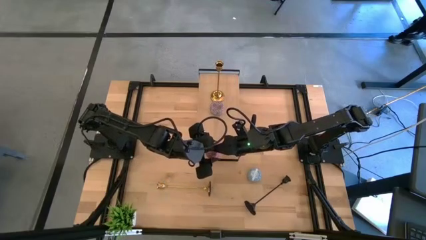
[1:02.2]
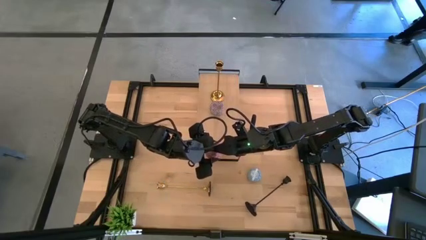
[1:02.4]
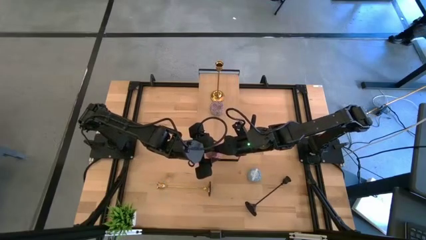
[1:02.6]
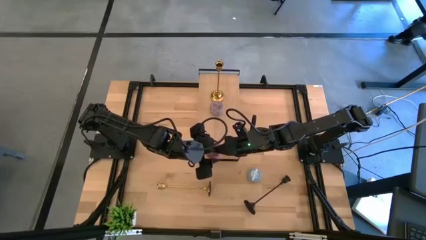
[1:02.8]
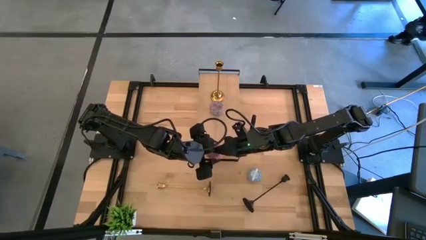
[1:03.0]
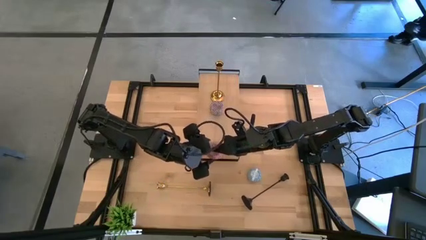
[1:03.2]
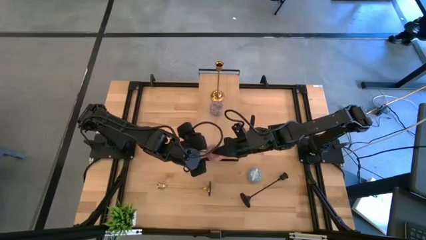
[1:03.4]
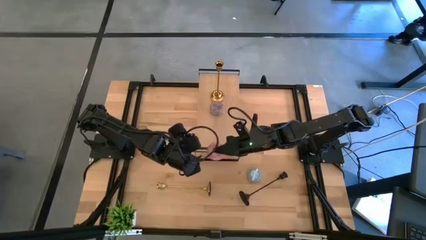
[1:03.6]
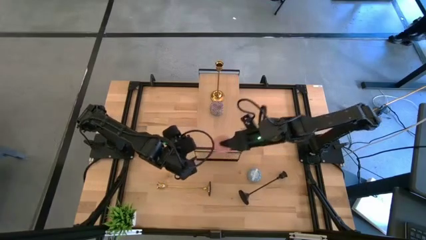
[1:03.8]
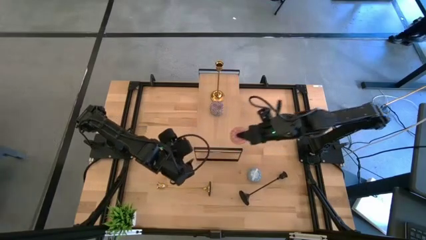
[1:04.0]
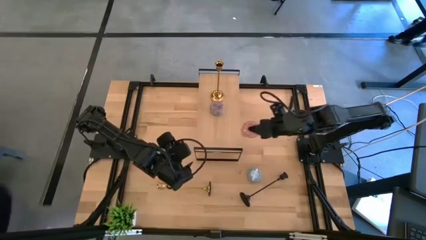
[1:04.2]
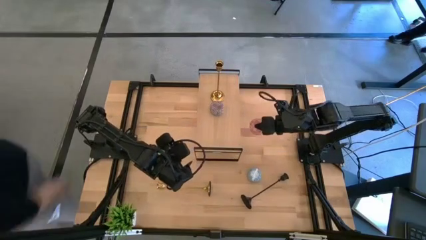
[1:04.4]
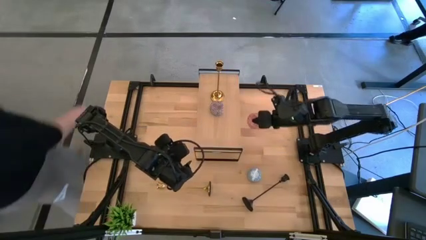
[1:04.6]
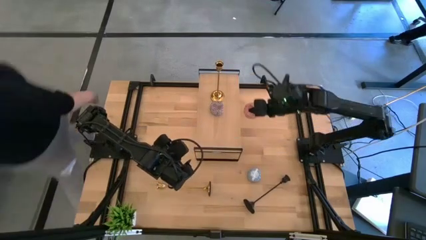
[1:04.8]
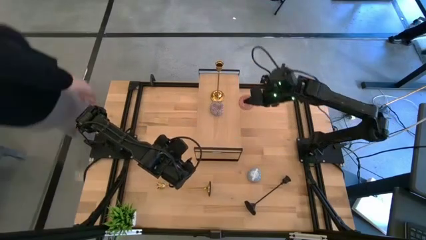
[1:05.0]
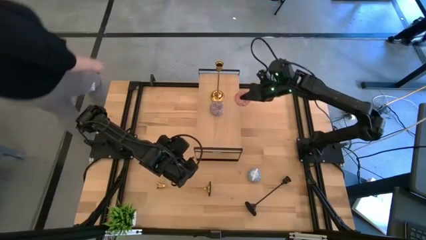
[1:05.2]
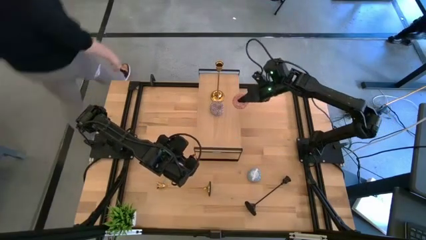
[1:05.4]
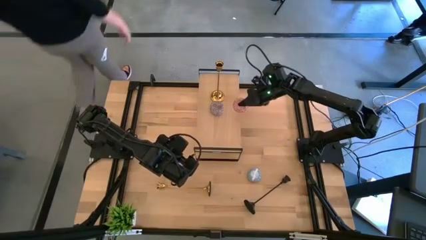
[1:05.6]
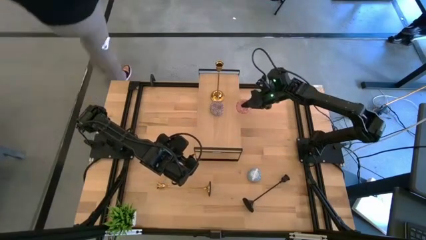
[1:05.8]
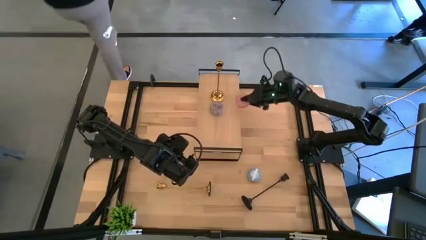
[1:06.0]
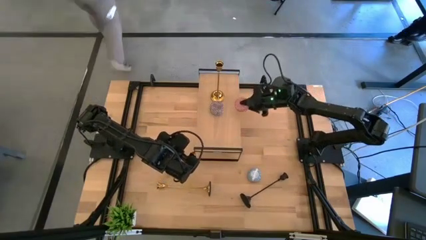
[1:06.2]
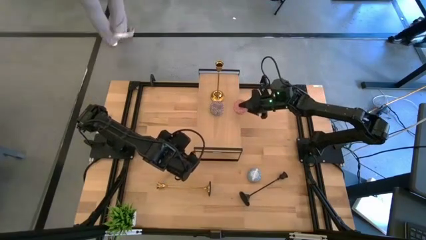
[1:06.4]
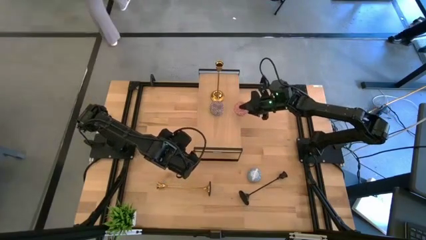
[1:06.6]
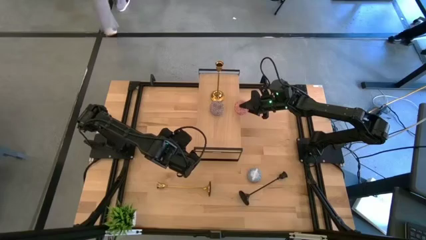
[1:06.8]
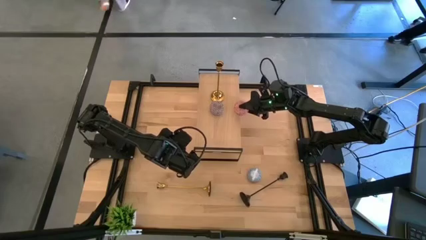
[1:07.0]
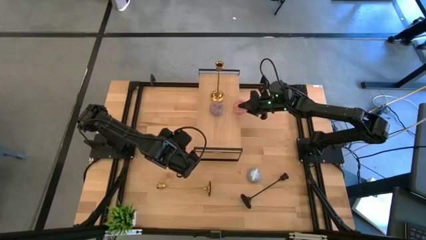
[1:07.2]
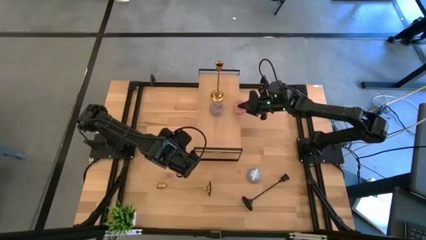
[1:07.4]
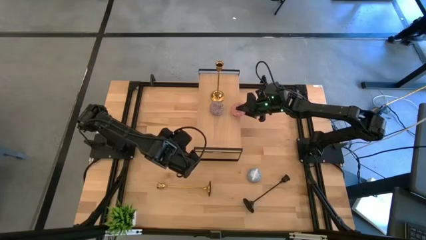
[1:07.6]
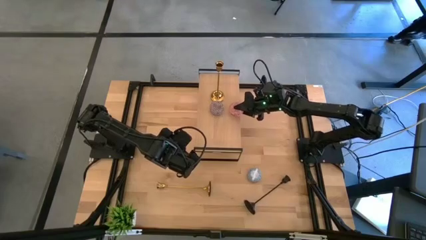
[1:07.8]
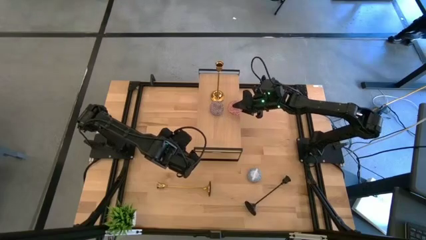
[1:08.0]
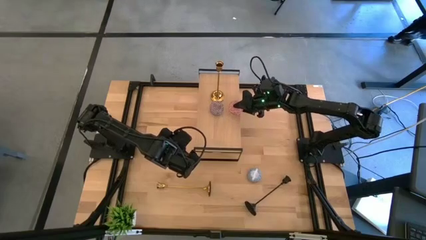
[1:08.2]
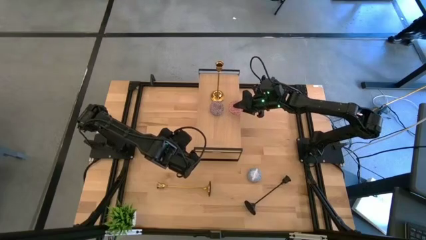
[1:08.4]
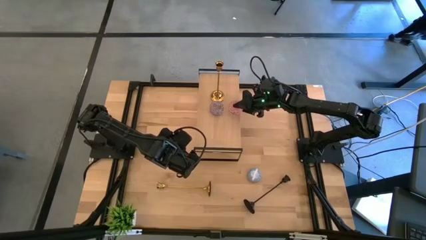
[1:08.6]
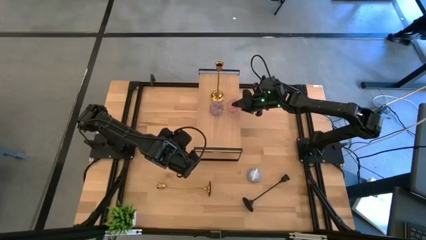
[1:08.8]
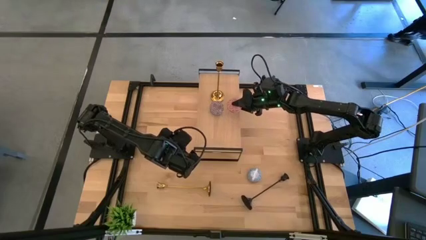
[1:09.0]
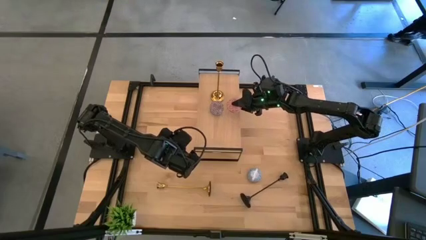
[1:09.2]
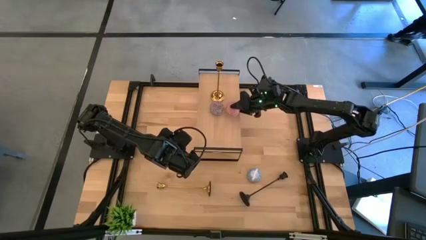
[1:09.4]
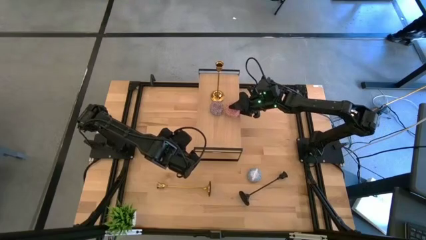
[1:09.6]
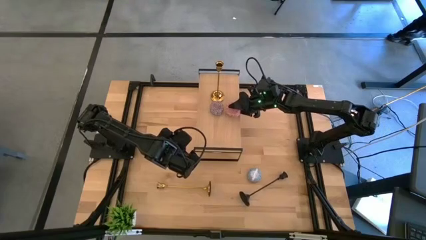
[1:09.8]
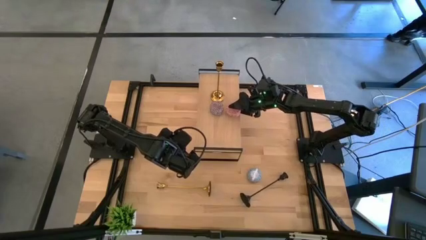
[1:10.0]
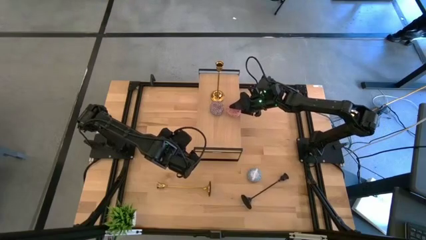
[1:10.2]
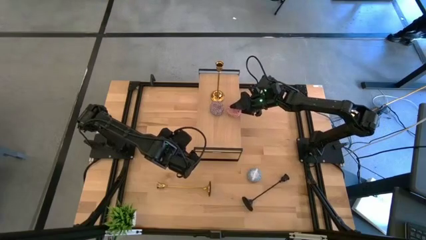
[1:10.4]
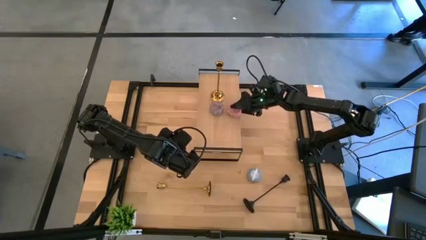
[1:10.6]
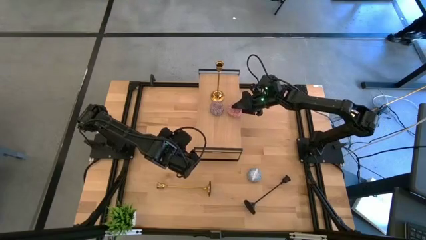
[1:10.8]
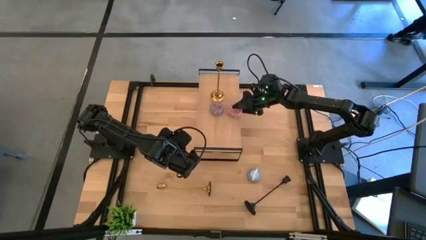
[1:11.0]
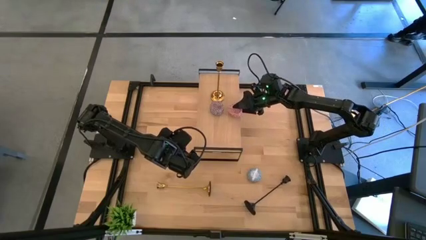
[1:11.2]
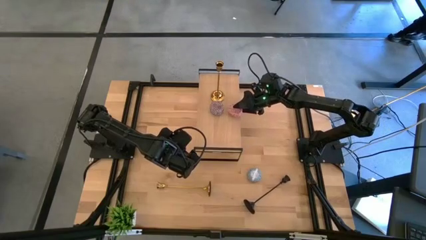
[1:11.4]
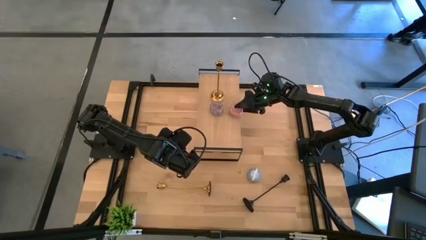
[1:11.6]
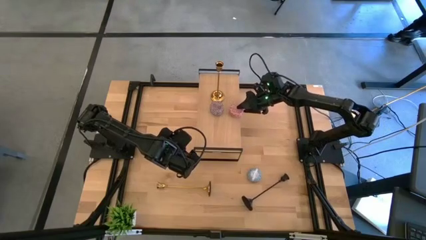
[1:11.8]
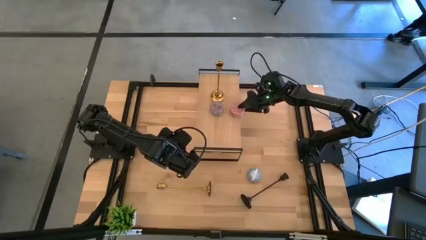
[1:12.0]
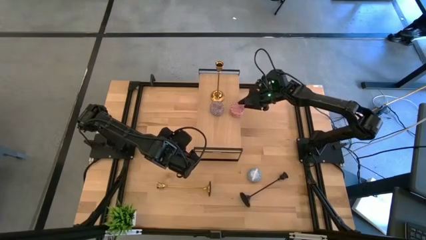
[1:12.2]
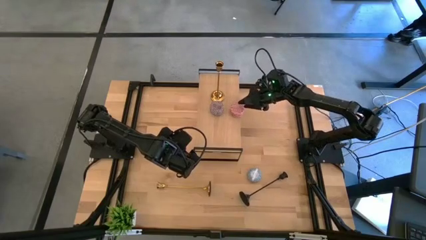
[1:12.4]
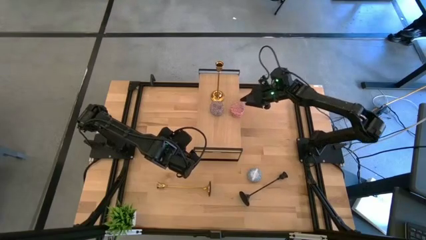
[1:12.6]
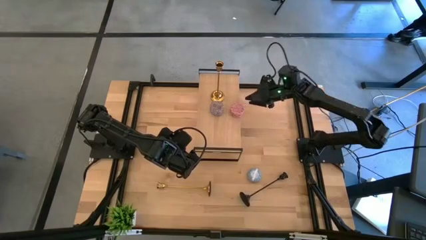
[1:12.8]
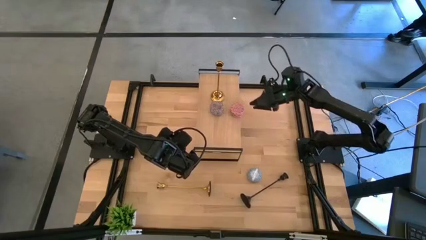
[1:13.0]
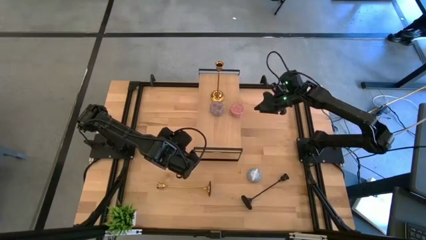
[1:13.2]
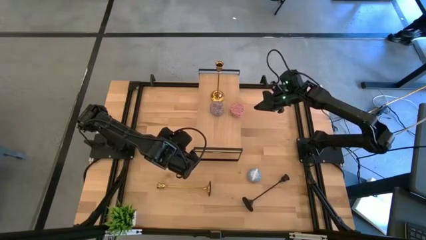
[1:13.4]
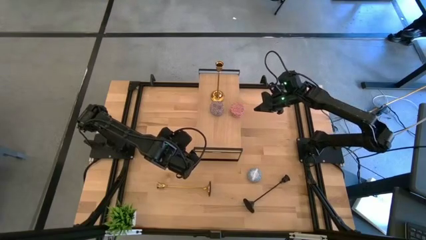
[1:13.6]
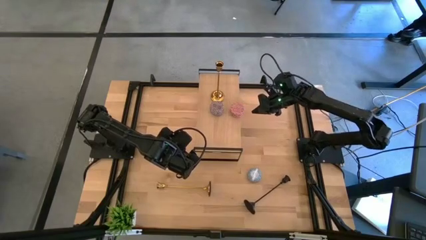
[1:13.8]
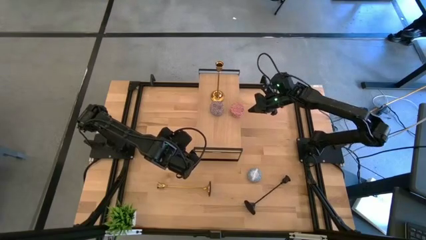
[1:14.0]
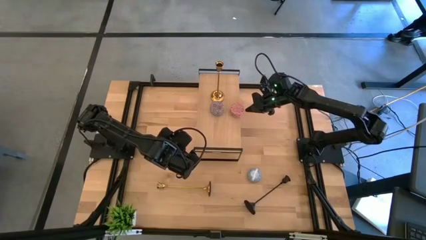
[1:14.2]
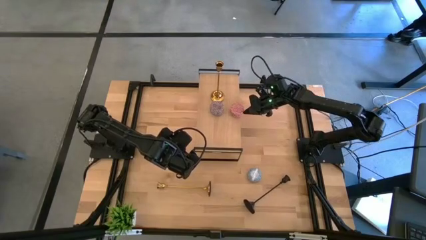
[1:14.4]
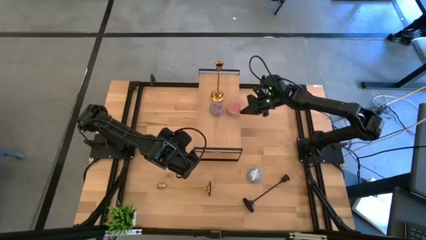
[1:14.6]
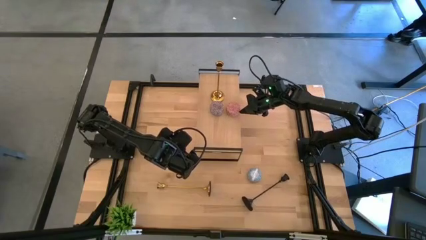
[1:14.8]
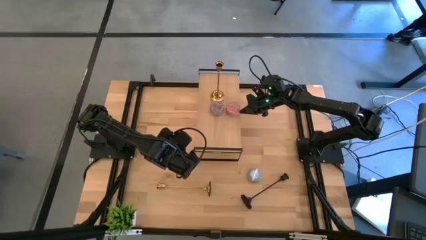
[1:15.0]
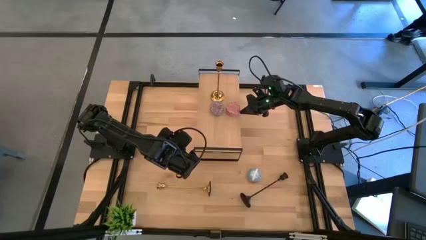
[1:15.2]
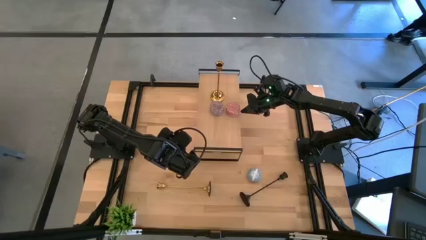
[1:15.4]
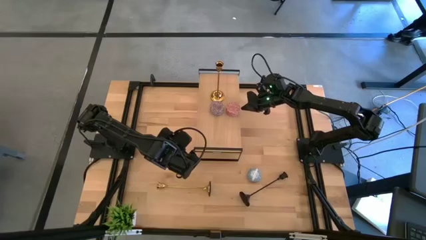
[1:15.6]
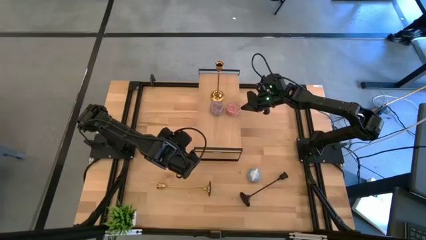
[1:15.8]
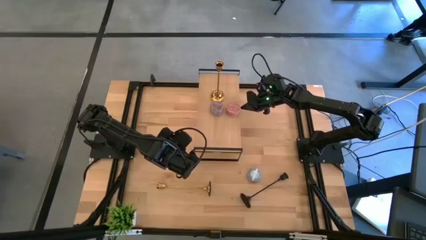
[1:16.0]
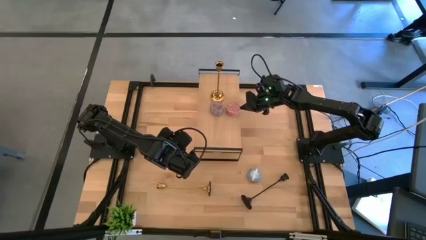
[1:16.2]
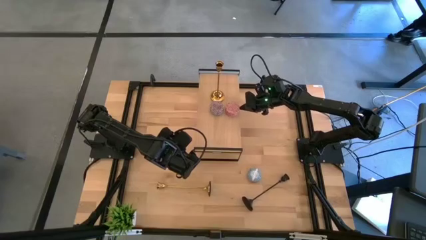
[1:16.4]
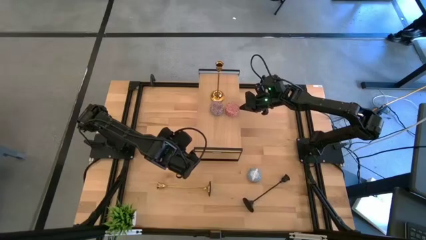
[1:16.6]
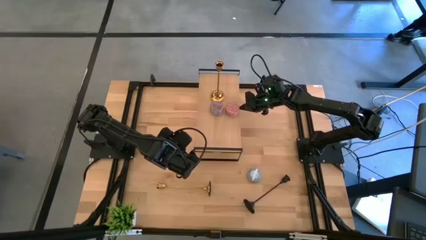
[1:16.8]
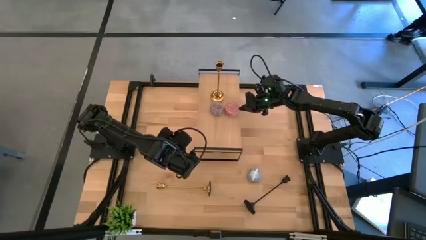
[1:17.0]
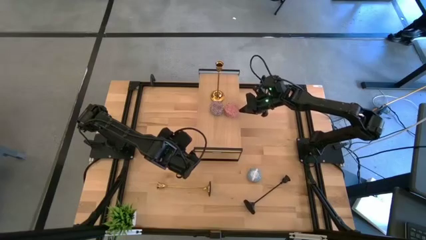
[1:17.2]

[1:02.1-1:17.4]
Task: Pick & Place candle stick holders
Put the pink scented candle on the shelf
